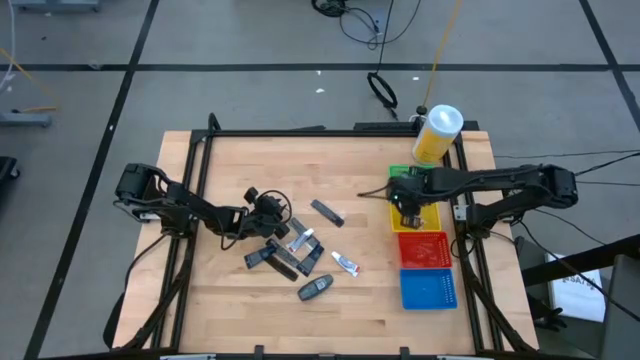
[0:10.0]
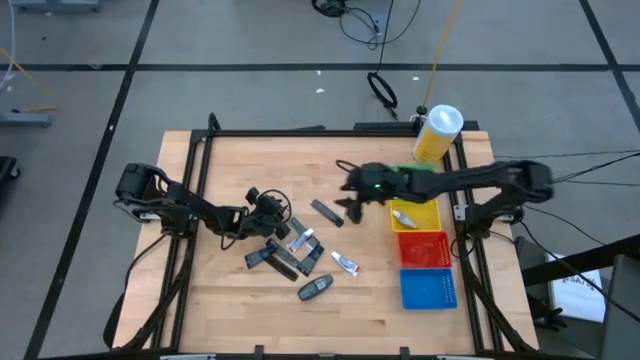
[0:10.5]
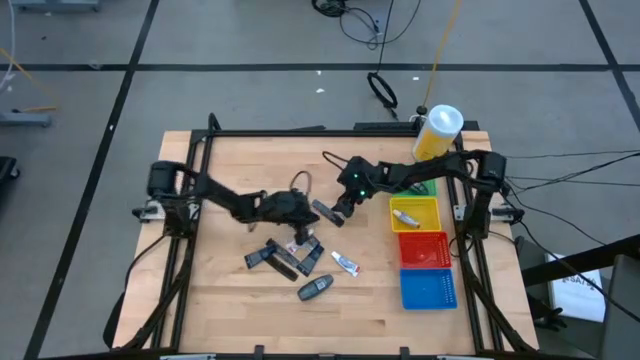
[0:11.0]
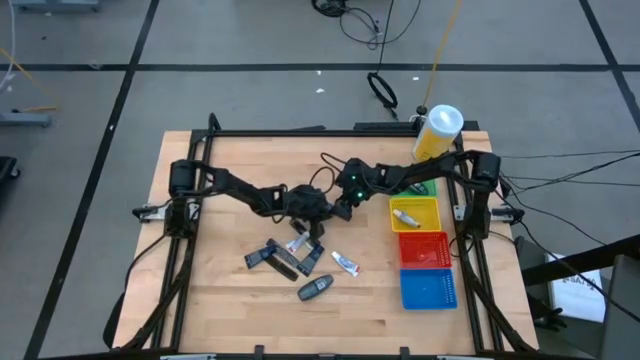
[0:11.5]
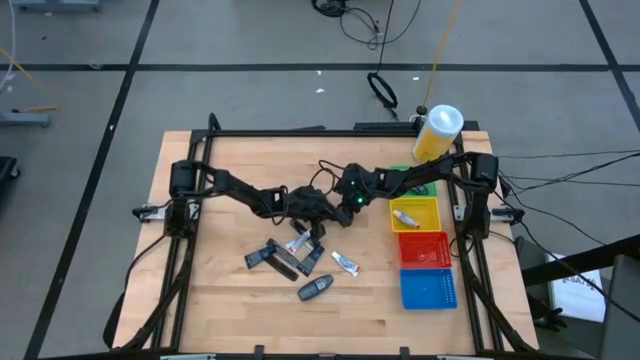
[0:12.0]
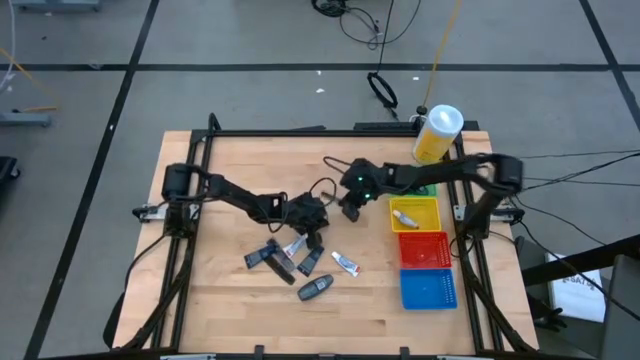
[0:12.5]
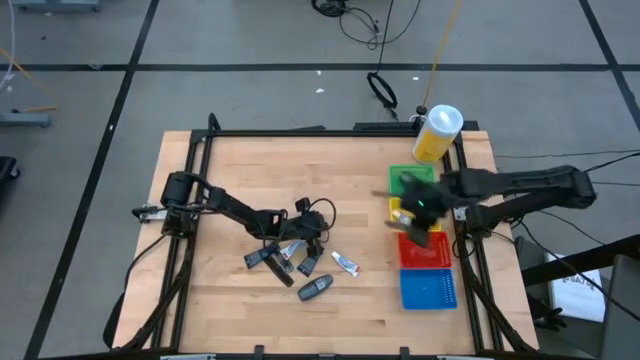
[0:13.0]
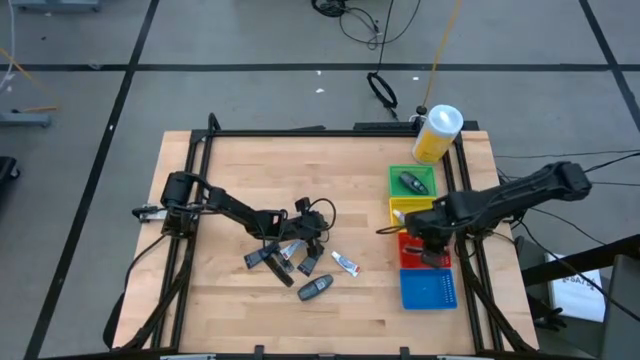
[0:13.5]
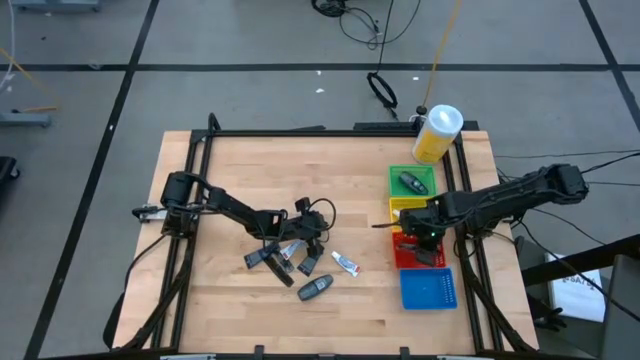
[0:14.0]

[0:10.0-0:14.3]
Task: Pick & Place Travel size toiletries
Put the black comb into the red basket

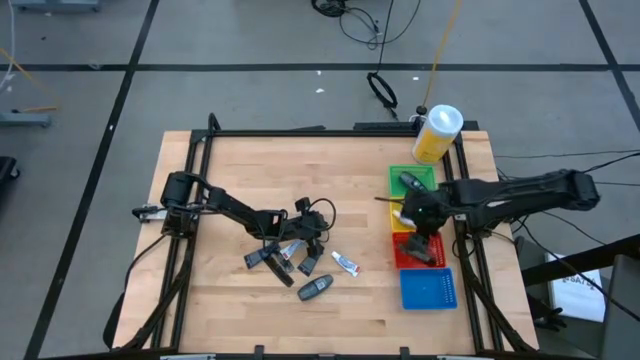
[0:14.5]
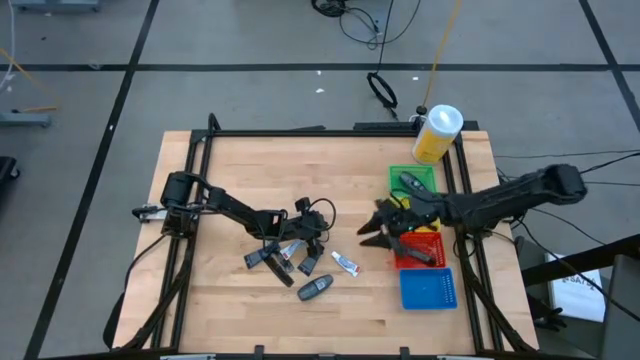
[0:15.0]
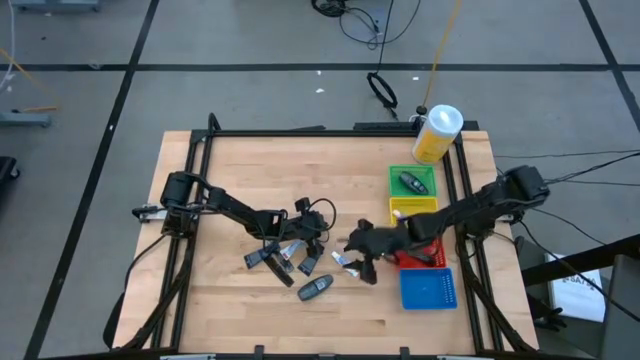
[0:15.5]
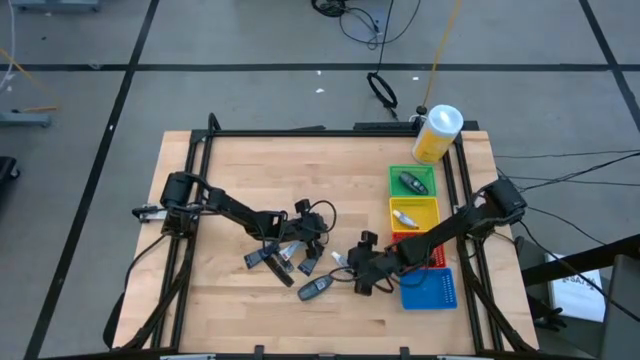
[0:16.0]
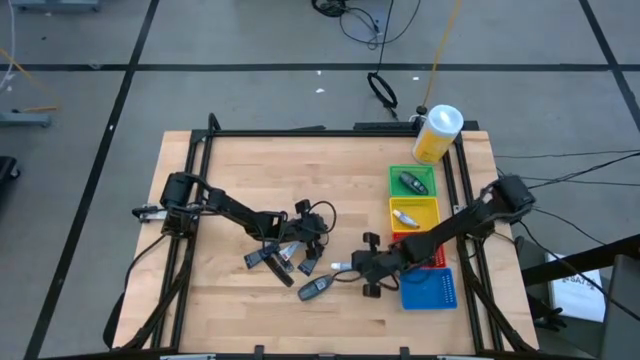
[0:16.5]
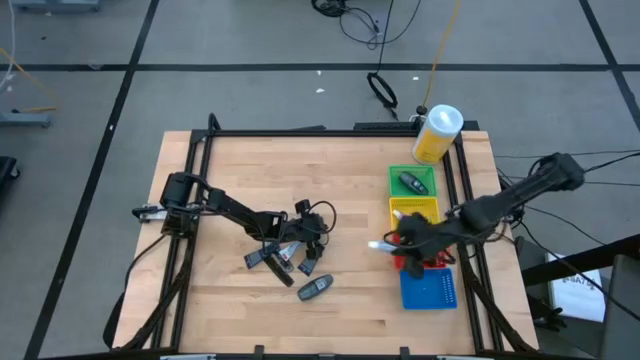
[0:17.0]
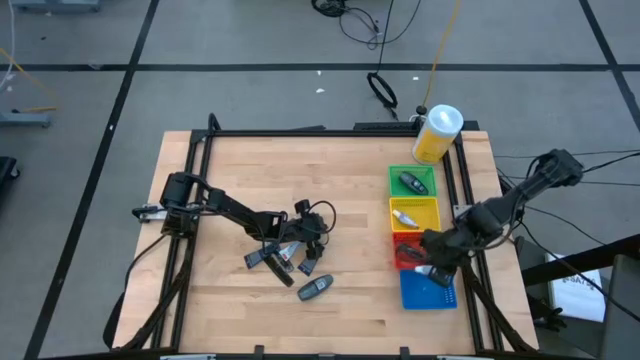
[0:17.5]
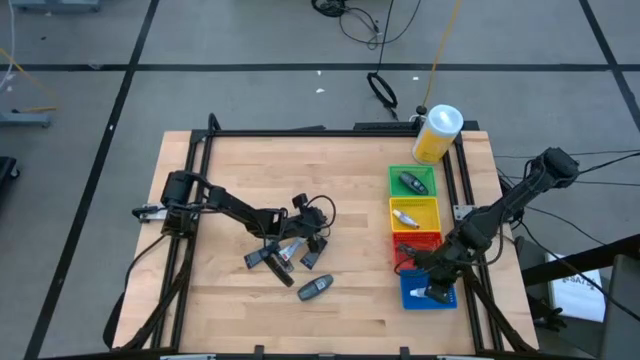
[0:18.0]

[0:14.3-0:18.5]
Put the white toothpaste into the blue basket

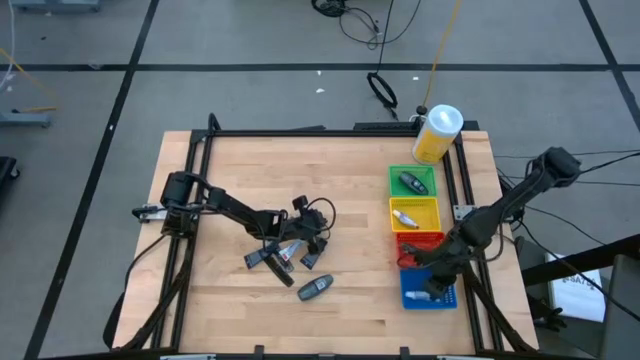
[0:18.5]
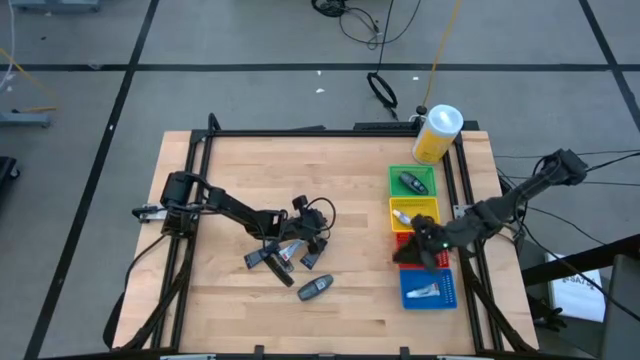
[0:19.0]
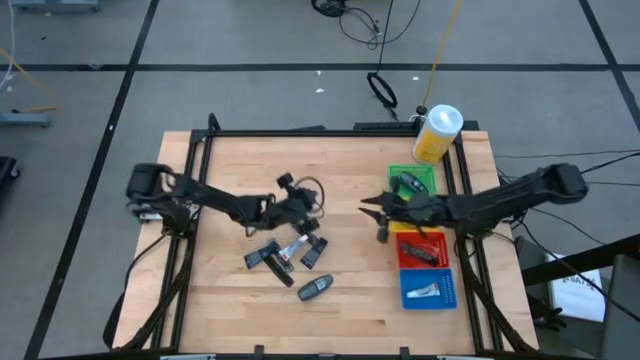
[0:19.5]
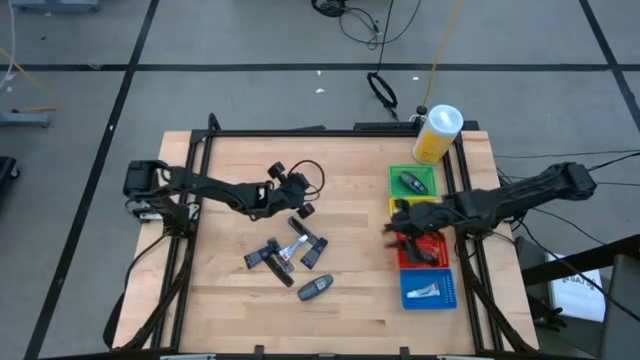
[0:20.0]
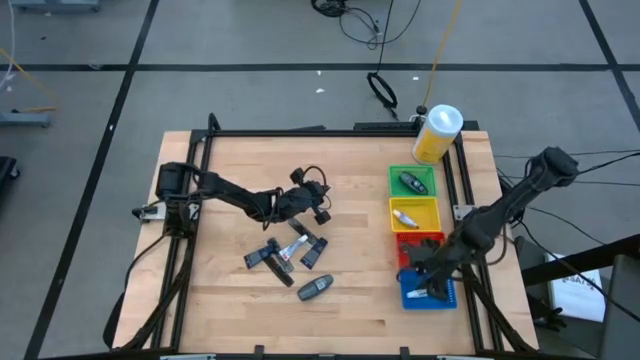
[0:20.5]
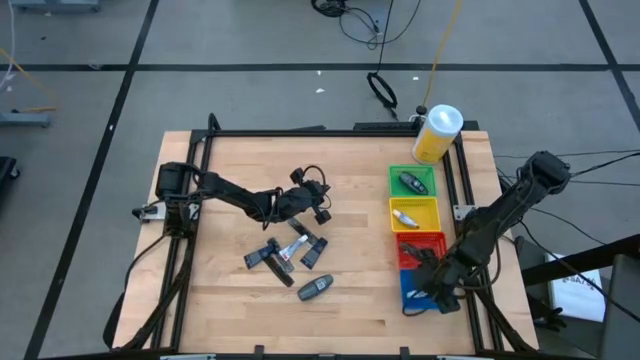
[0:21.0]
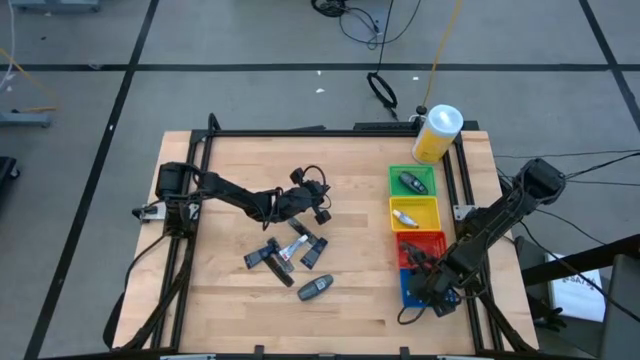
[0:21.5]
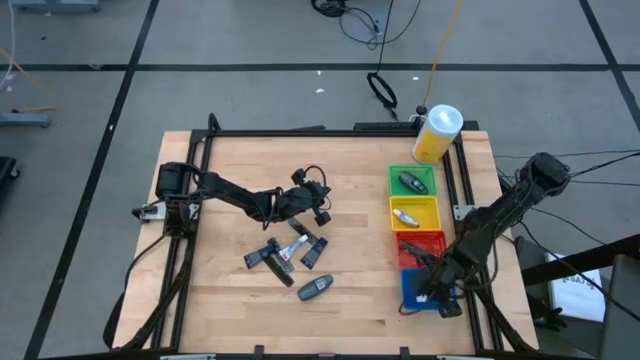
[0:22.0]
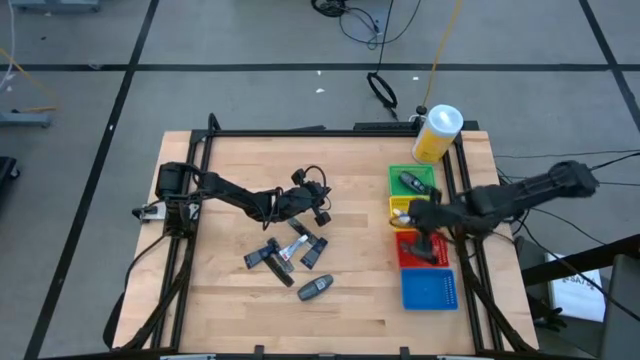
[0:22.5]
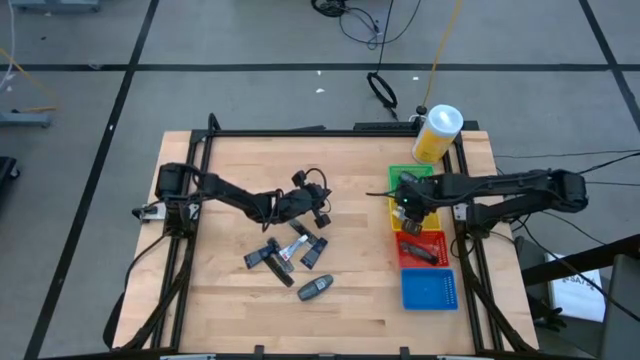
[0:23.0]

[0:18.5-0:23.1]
Put the white toothpaste into the yellow basket

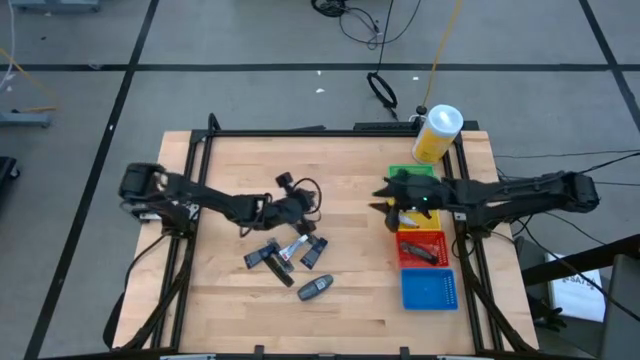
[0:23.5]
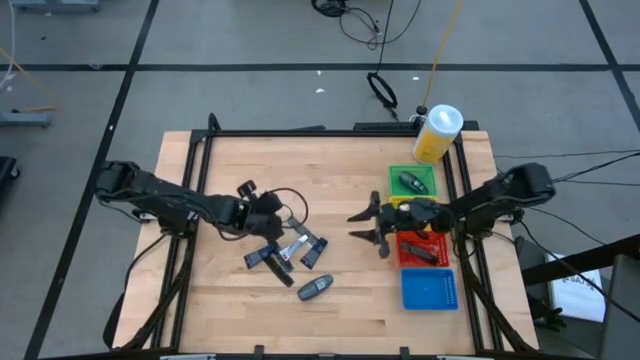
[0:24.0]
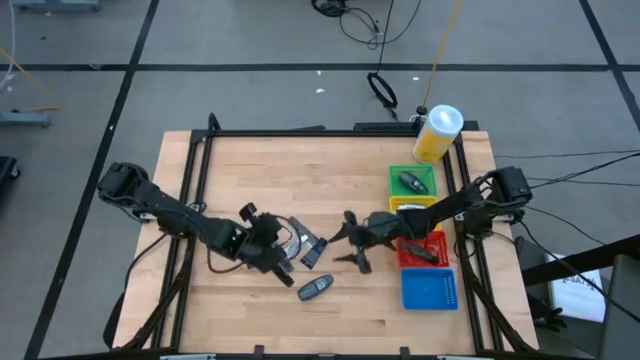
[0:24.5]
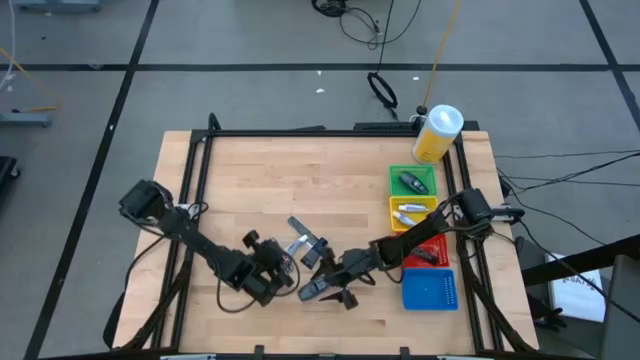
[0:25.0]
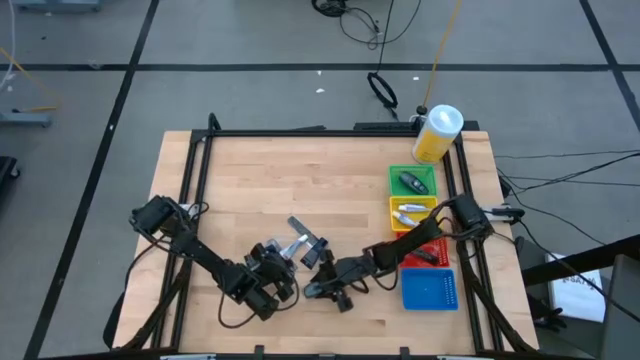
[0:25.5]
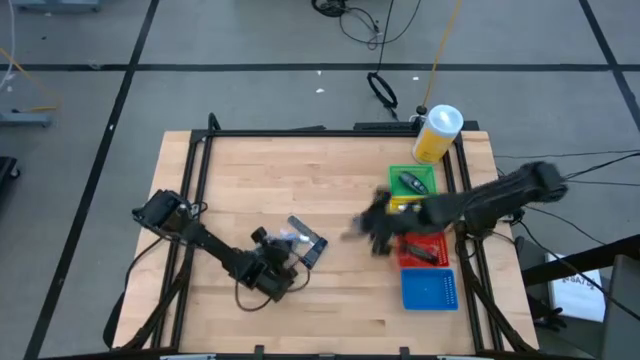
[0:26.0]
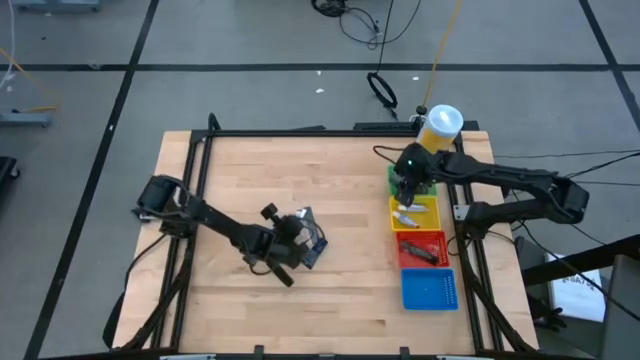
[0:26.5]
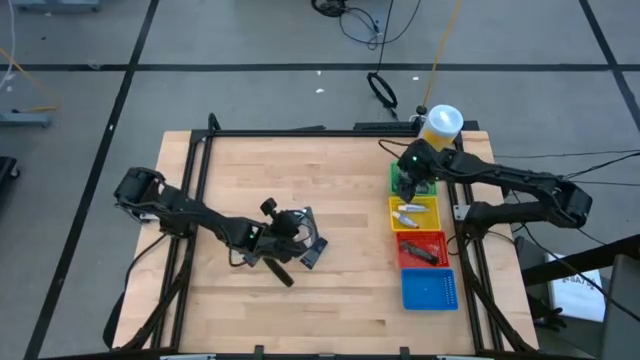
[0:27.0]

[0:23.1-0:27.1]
Put the gray deodorant into the green basket

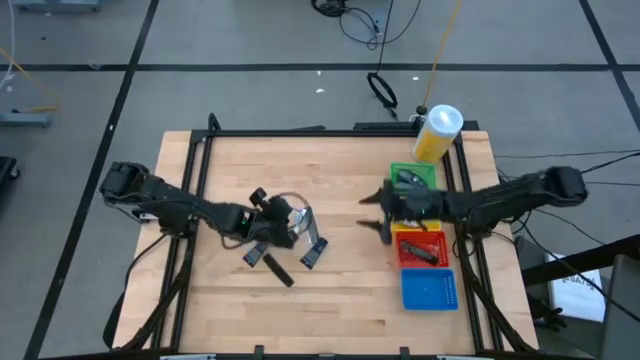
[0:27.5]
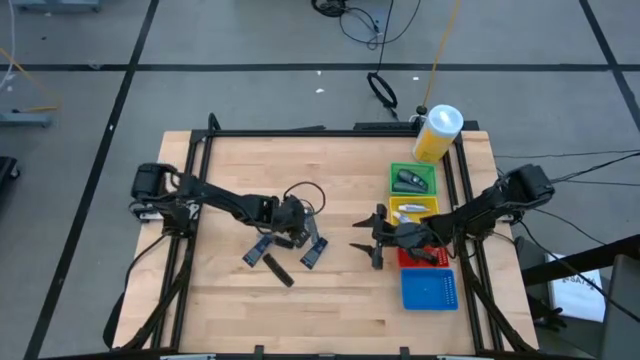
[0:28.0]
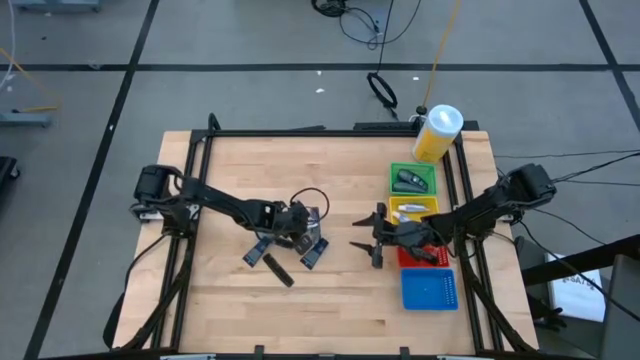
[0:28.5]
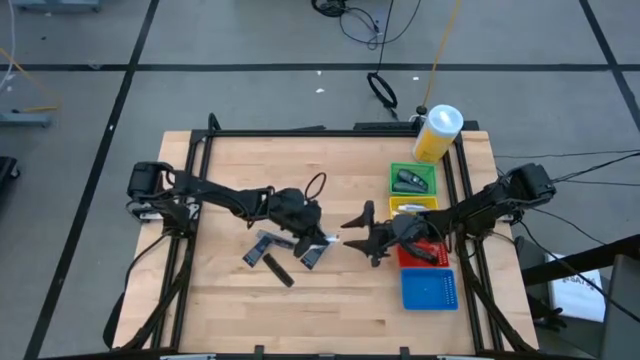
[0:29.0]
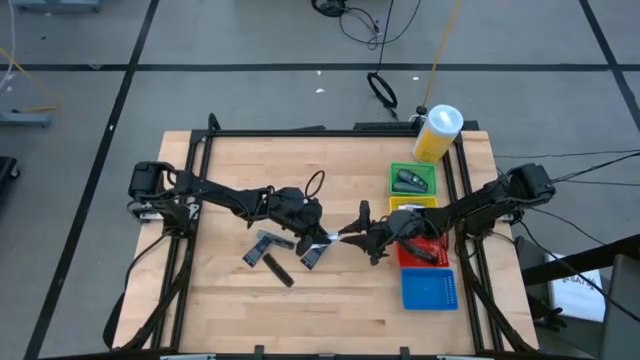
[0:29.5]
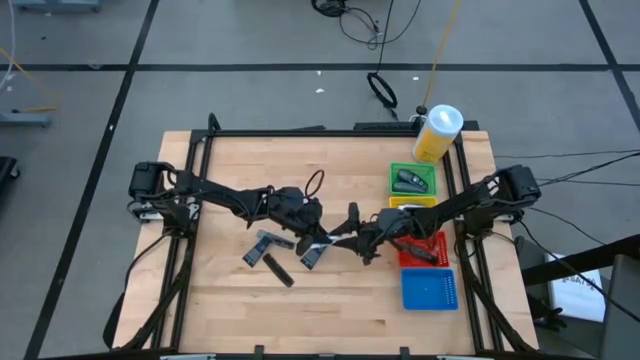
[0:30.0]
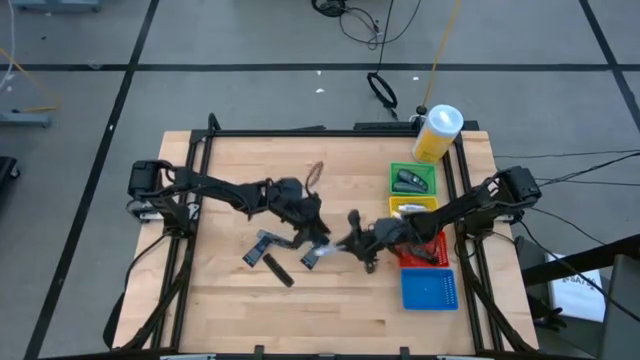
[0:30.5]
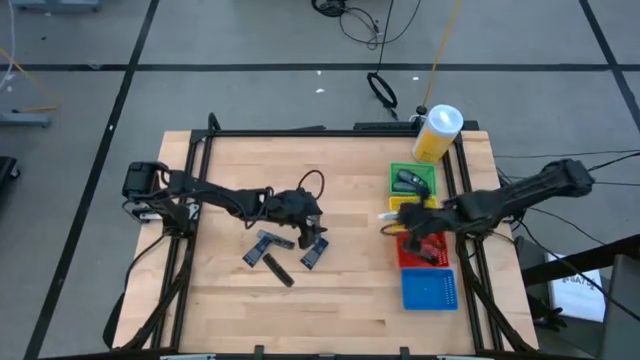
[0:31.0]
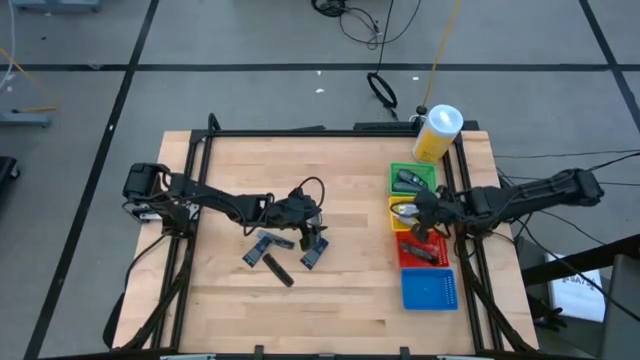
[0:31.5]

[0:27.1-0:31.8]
Put the white toothpaste into the yellow basket
